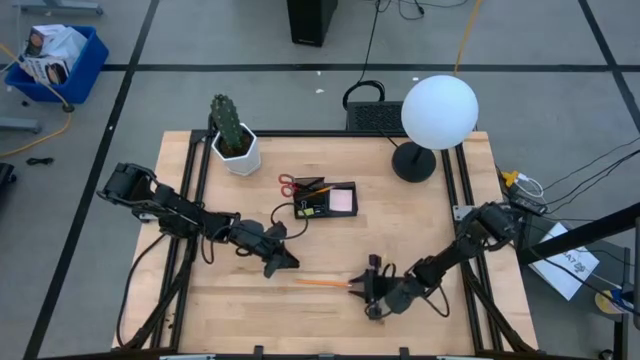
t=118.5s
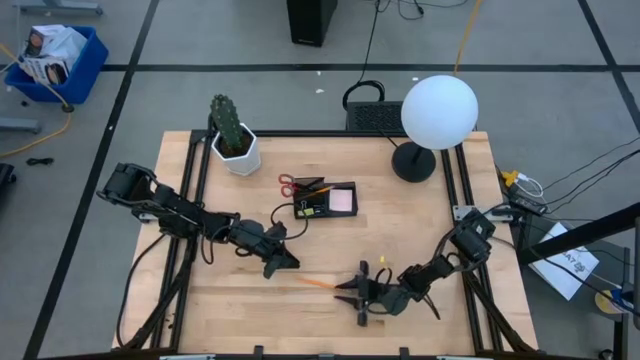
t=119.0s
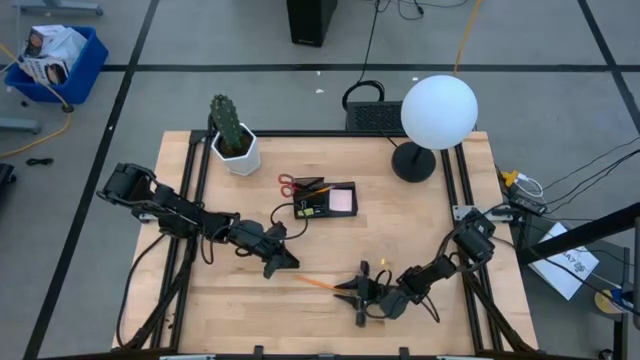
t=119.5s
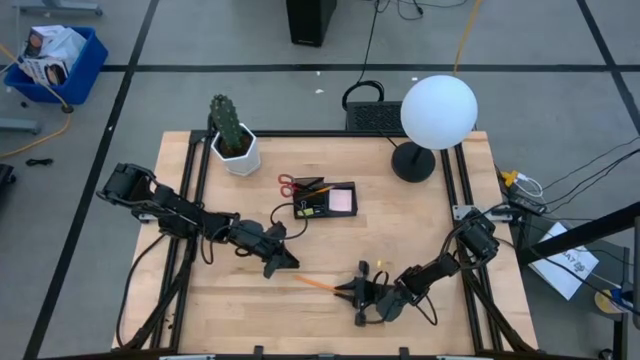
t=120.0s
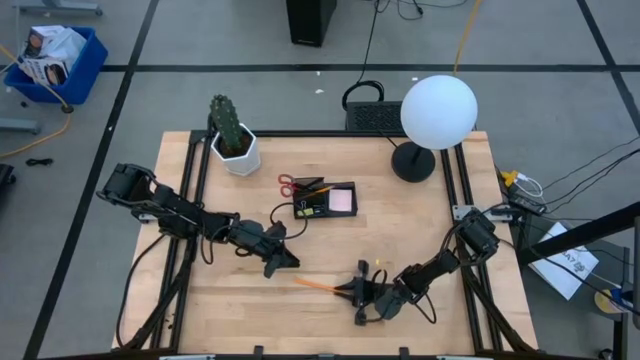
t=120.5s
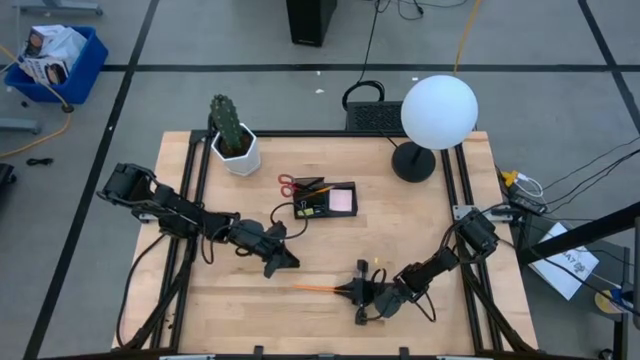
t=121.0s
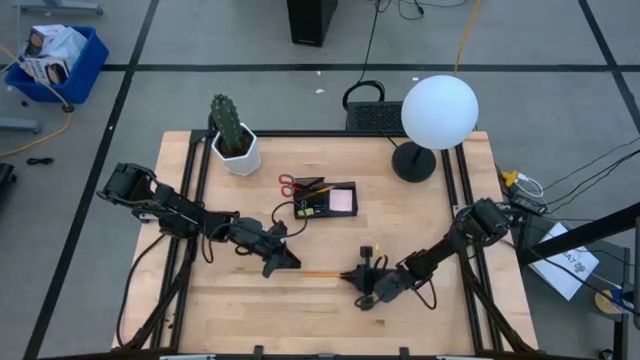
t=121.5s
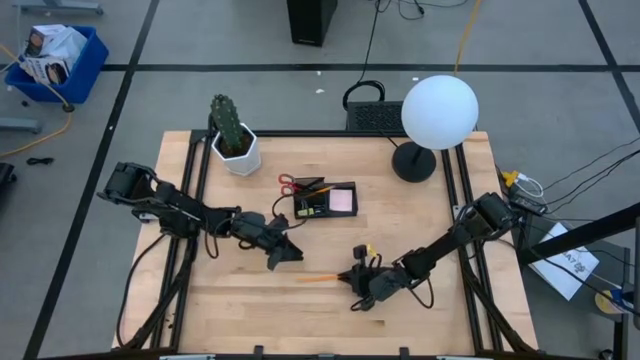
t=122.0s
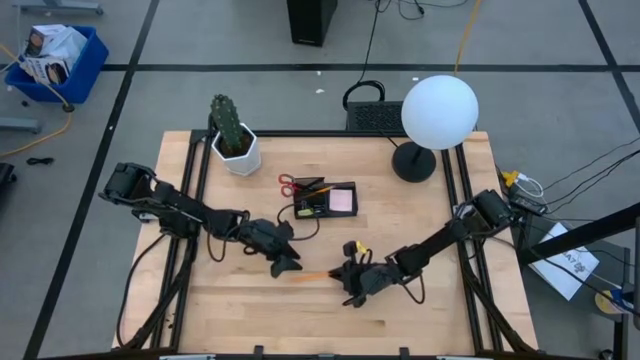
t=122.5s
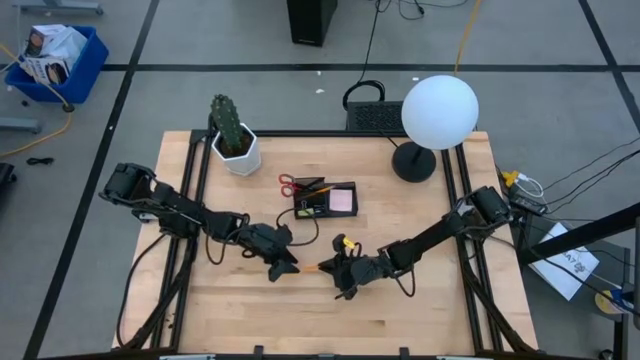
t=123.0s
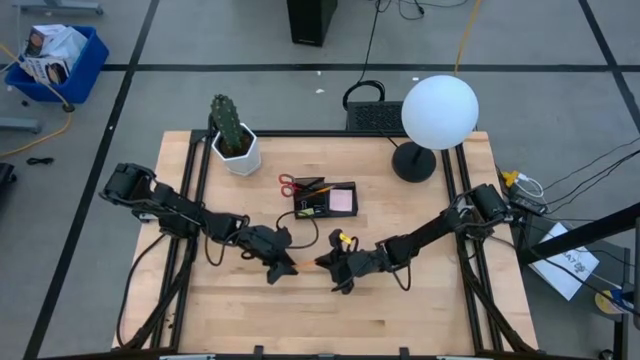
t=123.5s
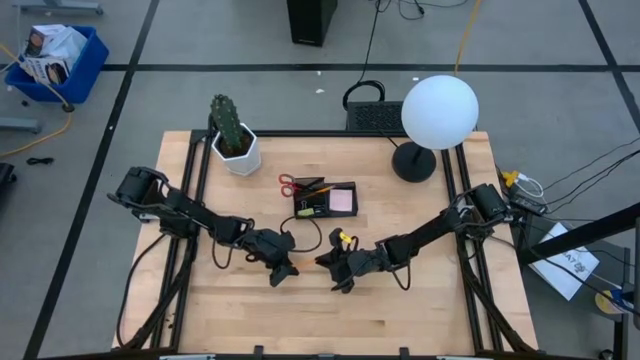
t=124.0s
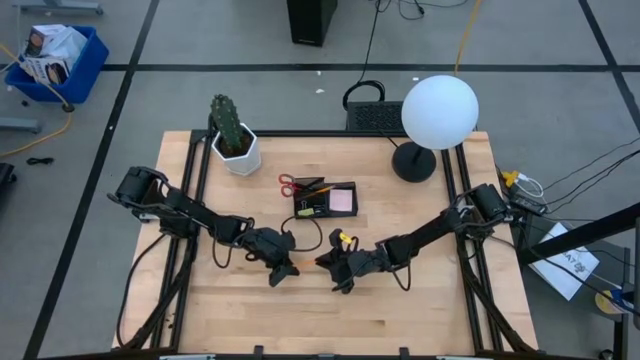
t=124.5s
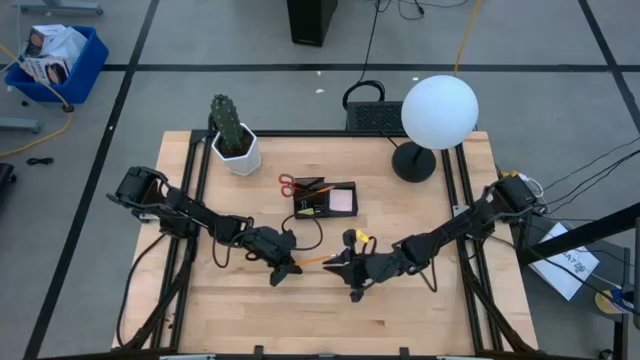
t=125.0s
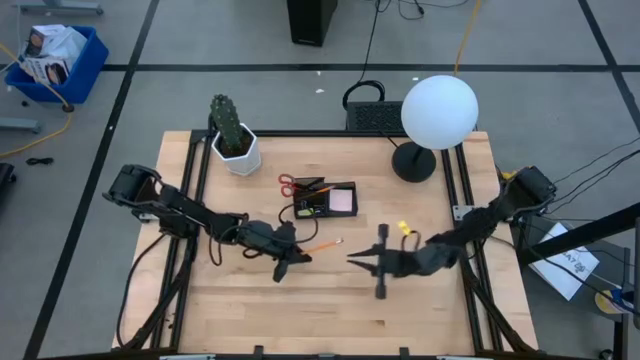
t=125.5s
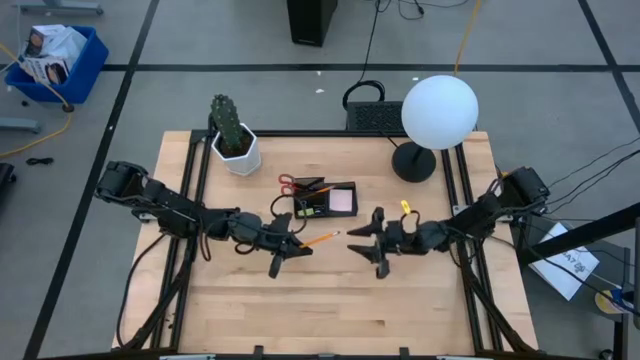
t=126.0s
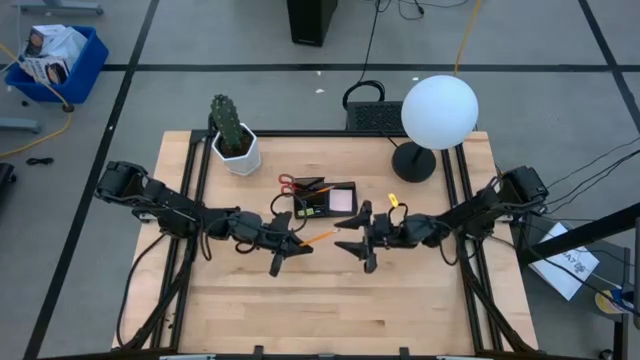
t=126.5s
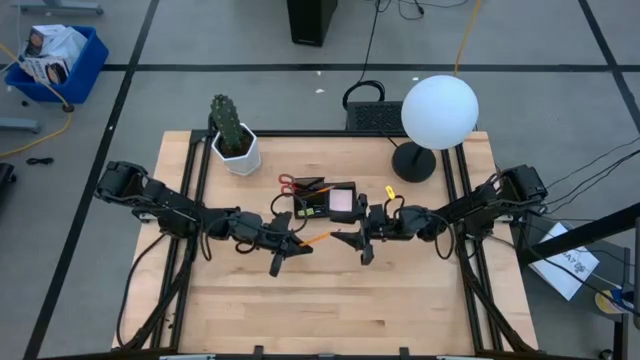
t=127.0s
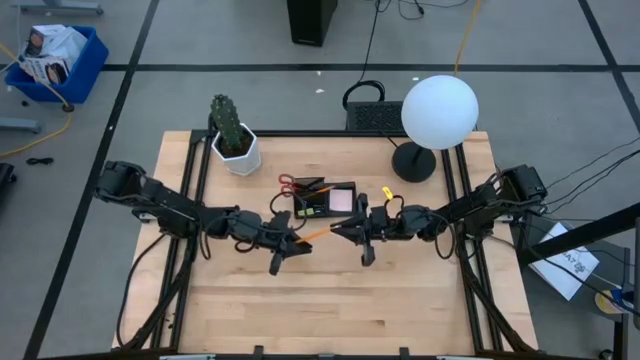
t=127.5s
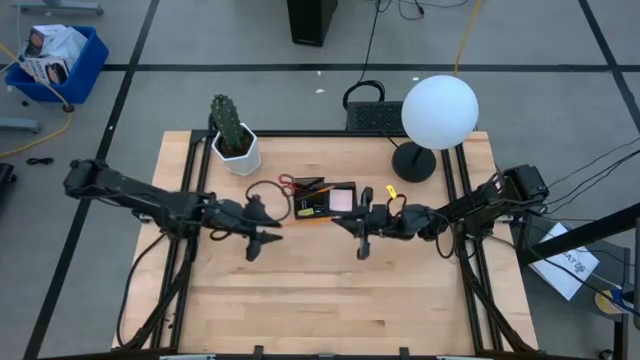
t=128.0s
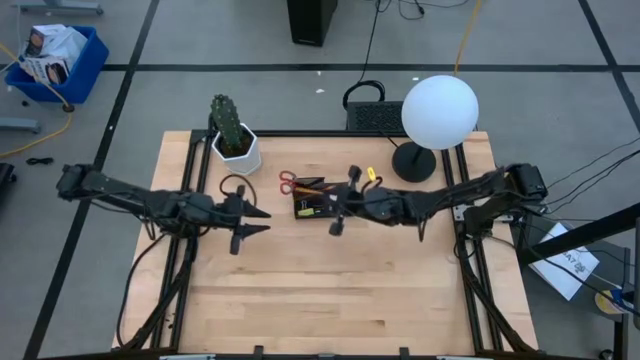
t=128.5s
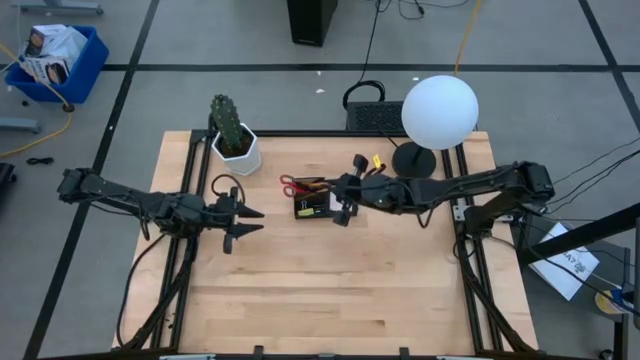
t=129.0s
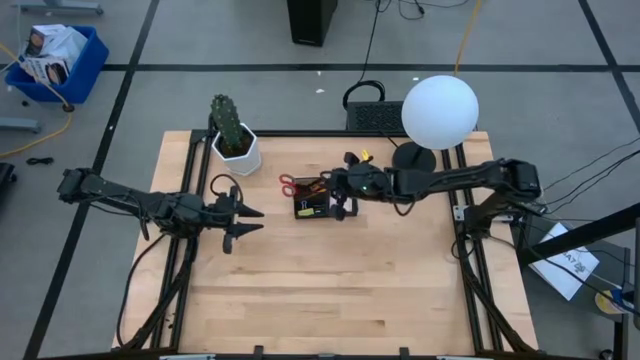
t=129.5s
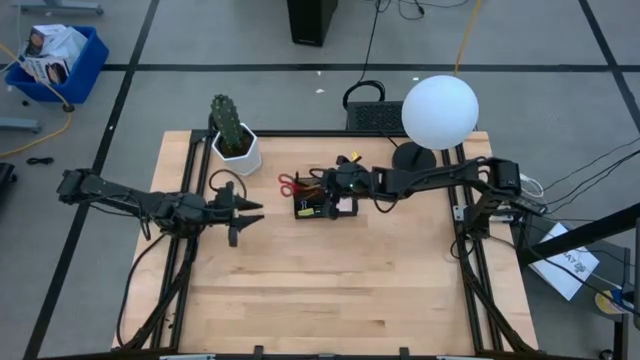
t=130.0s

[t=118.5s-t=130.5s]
Task: Pick and place office supplies into organizer
Put the orange pencil into the top left of the desk organizer

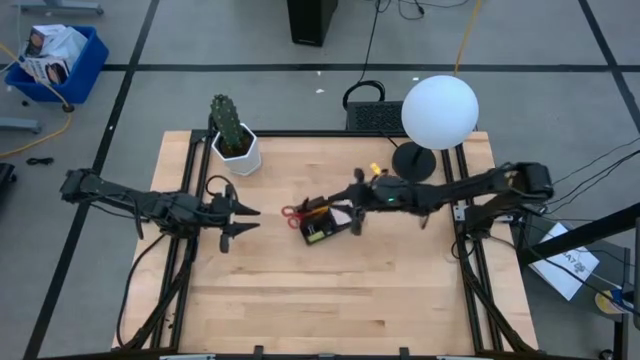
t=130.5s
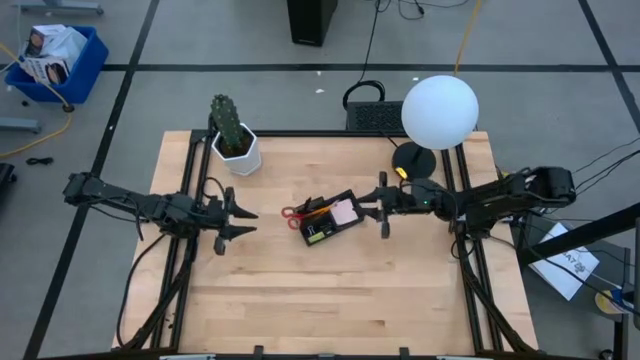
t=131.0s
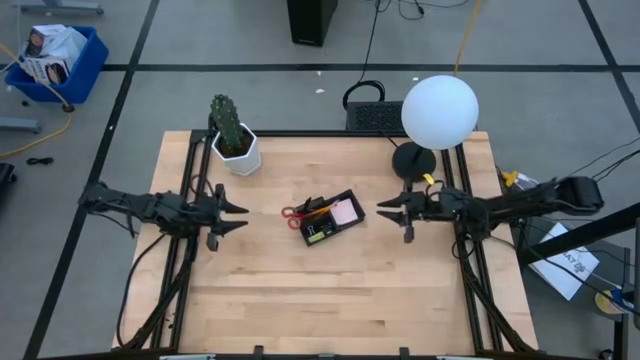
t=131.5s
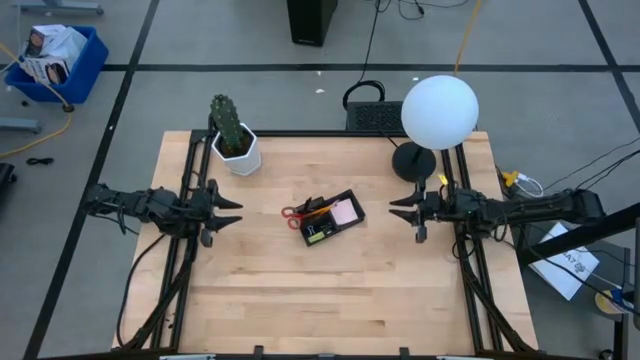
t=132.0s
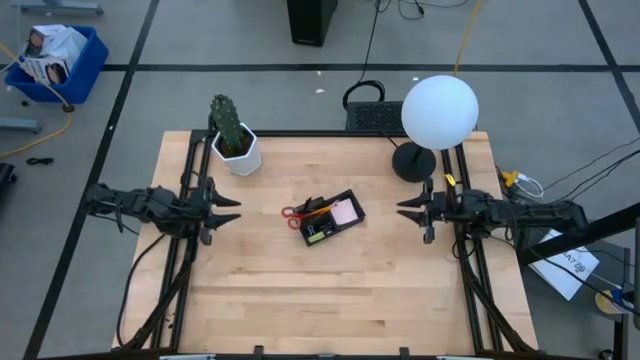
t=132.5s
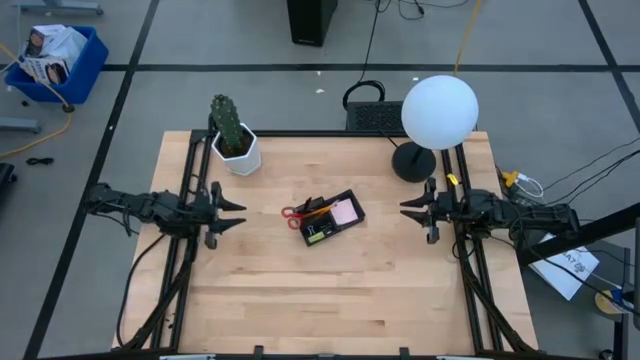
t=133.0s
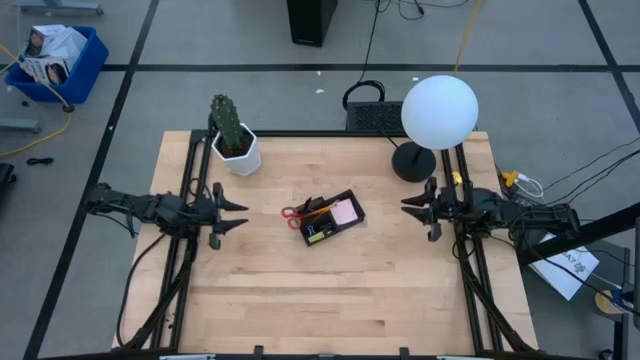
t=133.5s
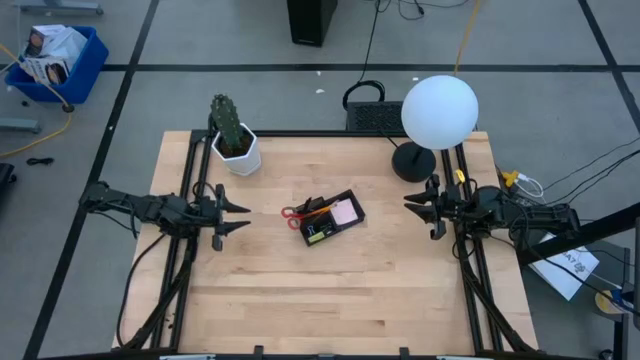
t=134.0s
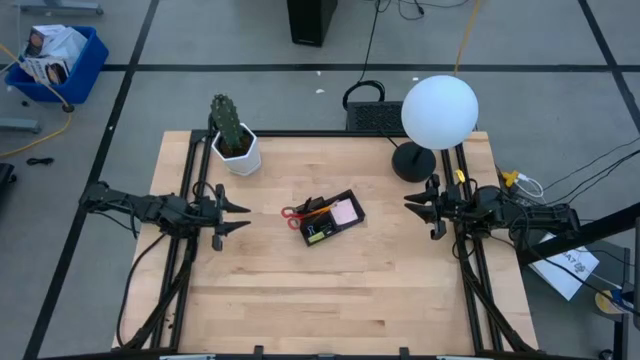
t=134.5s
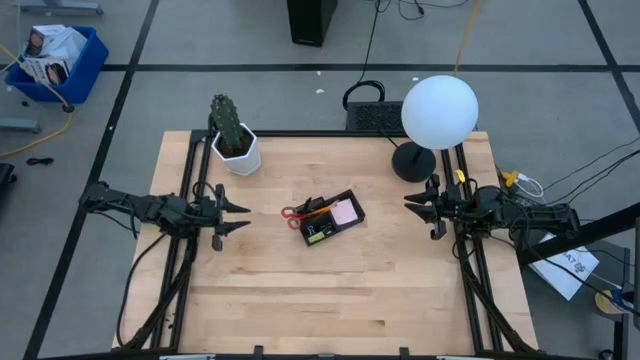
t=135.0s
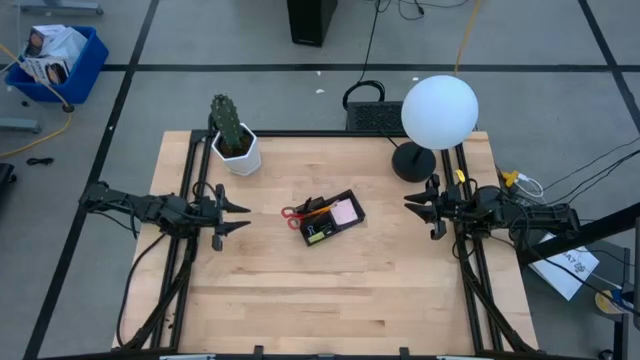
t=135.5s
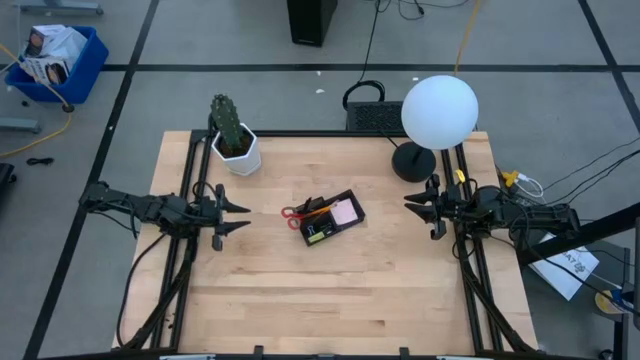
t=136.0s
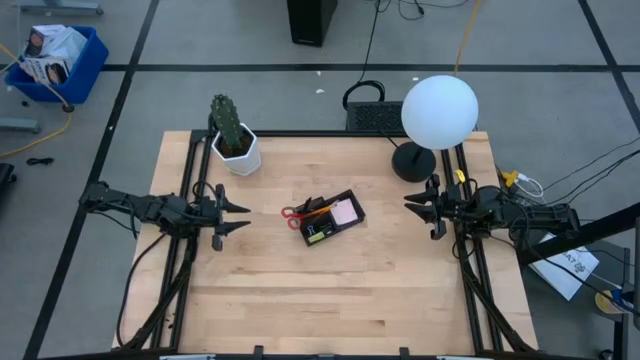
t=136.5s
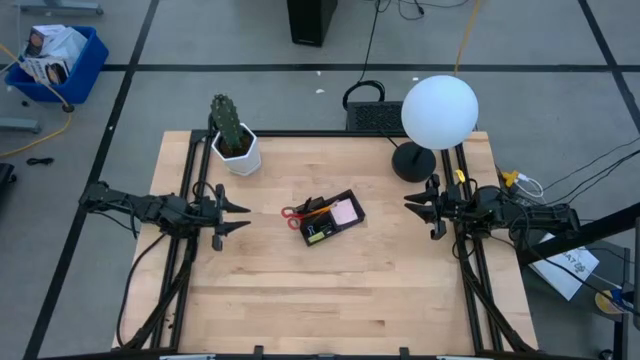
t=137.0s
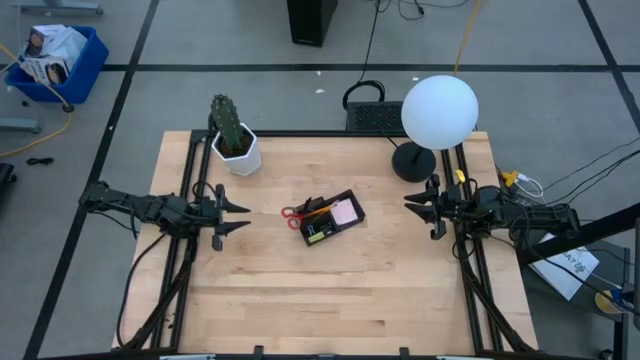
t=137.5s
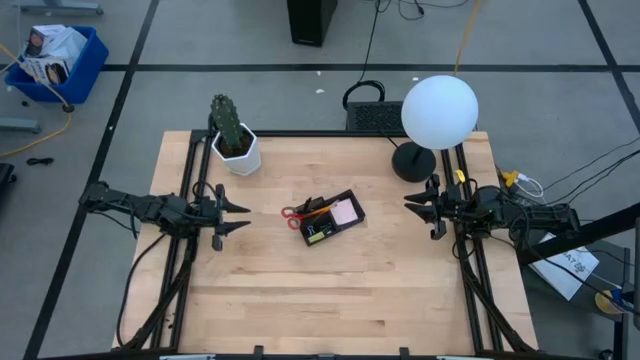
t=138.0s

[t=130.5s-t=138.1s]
Return to Home Position
